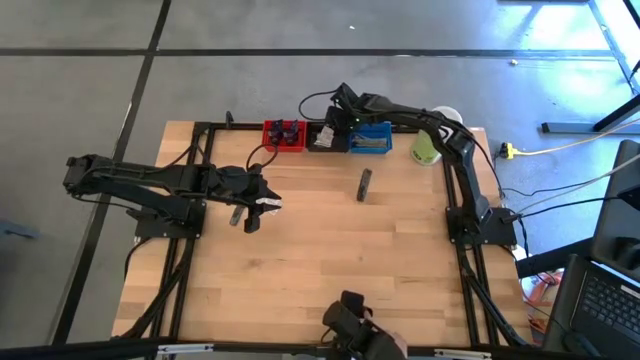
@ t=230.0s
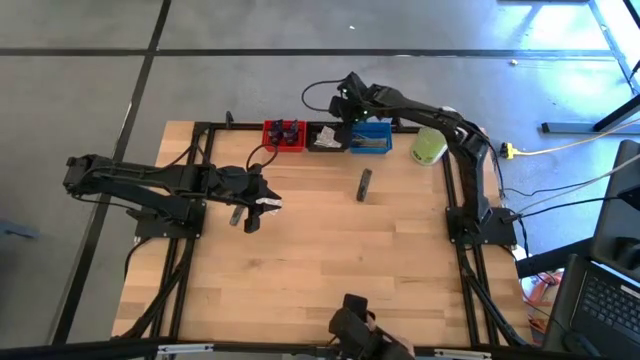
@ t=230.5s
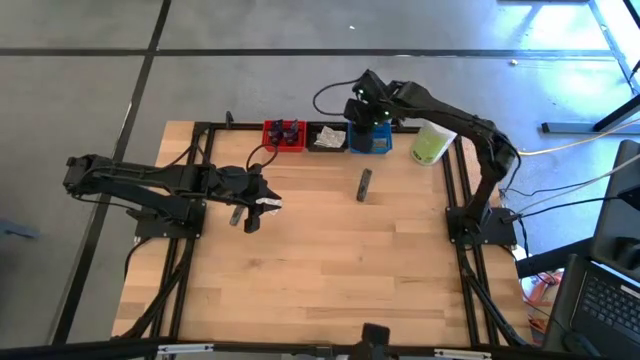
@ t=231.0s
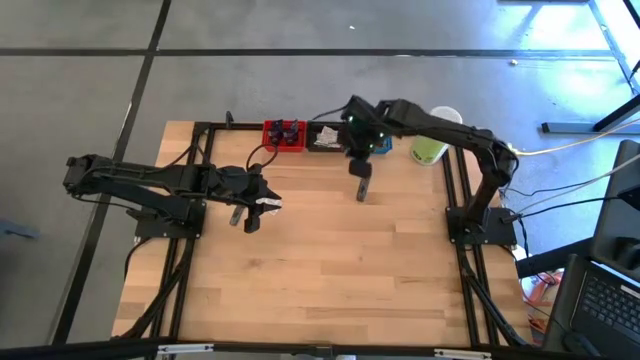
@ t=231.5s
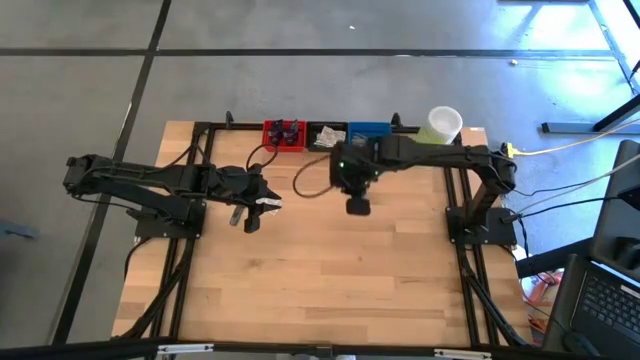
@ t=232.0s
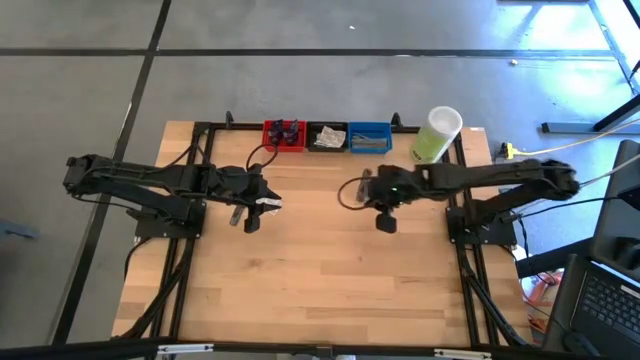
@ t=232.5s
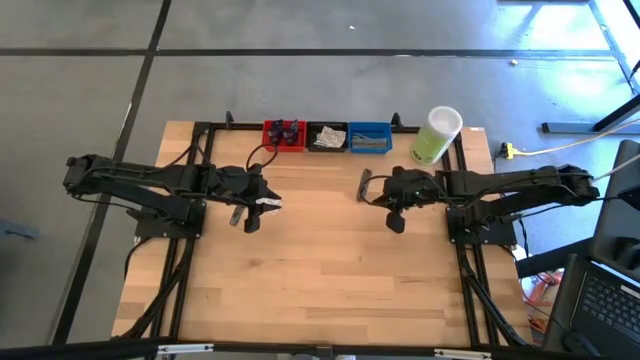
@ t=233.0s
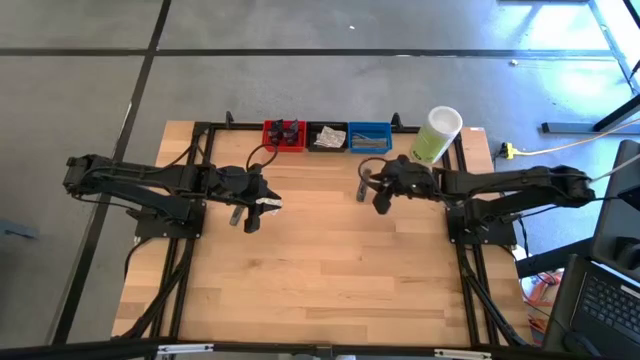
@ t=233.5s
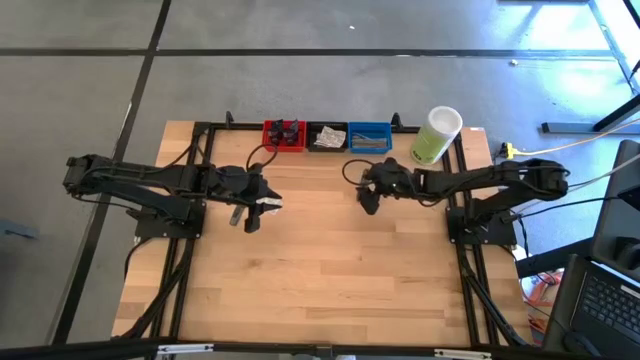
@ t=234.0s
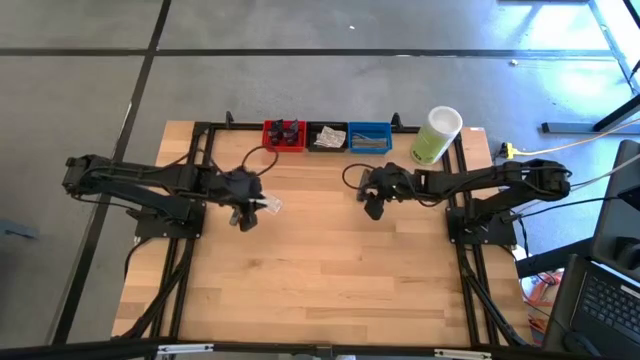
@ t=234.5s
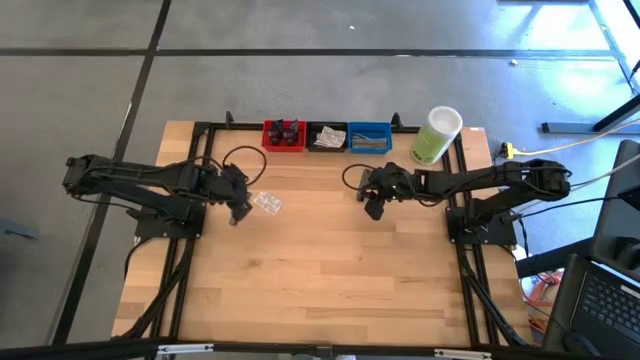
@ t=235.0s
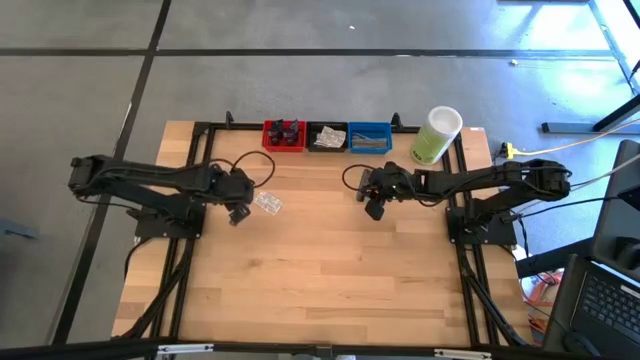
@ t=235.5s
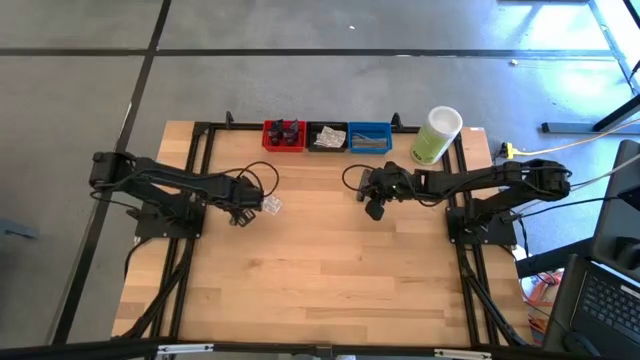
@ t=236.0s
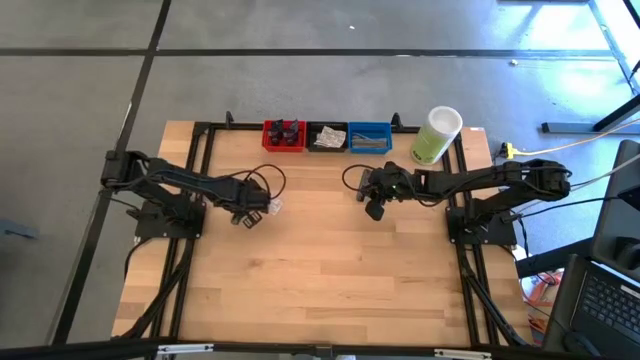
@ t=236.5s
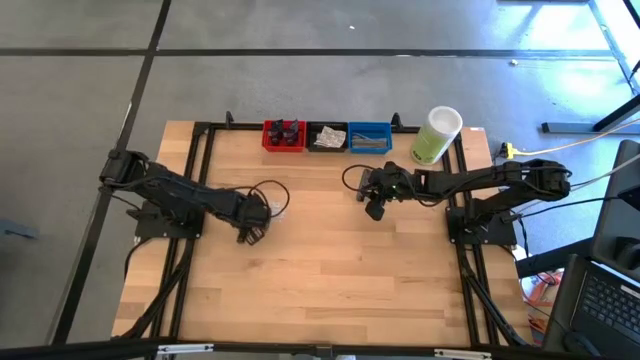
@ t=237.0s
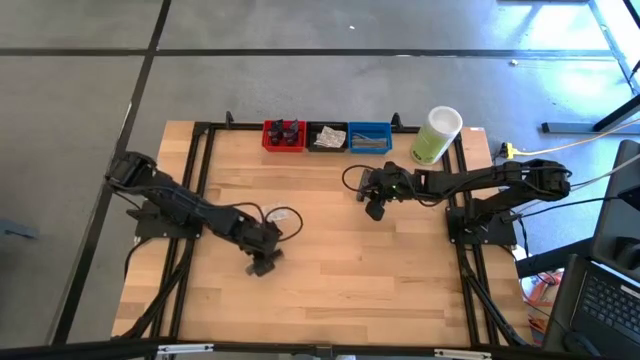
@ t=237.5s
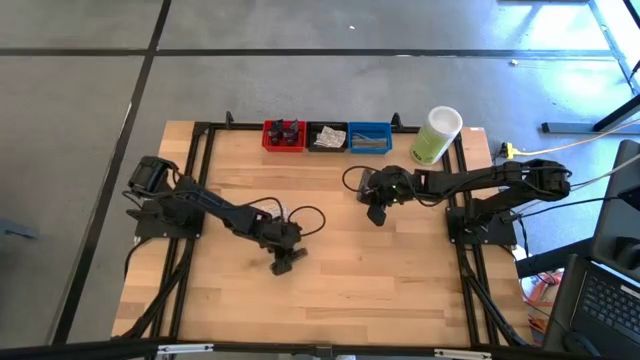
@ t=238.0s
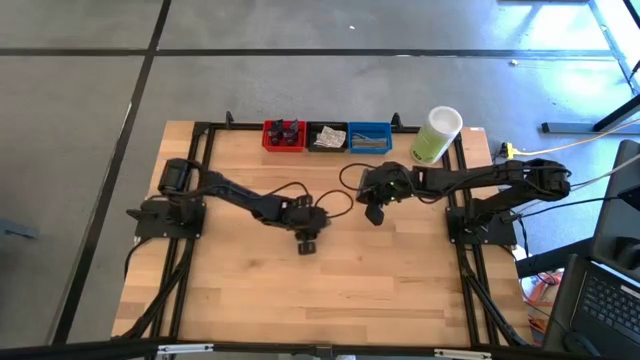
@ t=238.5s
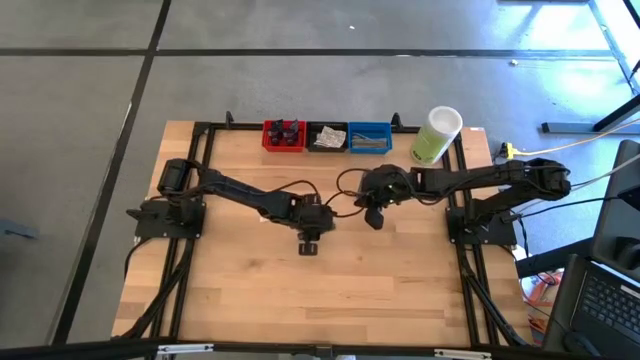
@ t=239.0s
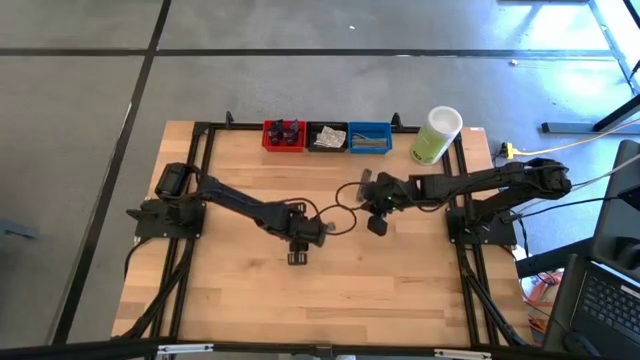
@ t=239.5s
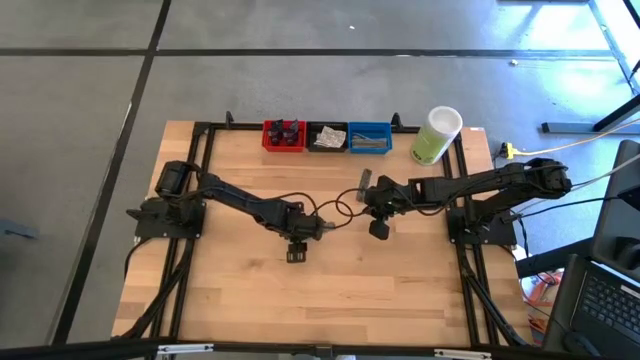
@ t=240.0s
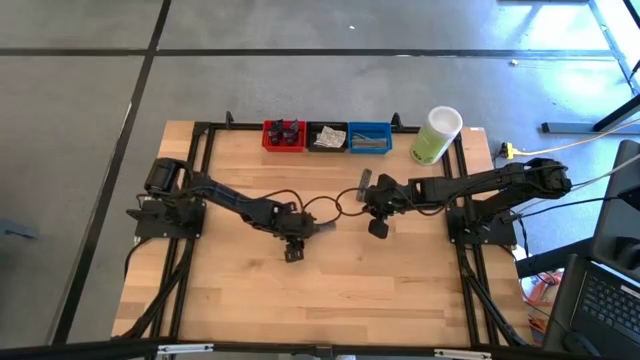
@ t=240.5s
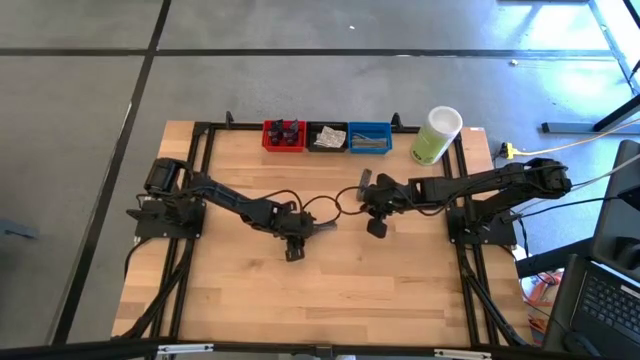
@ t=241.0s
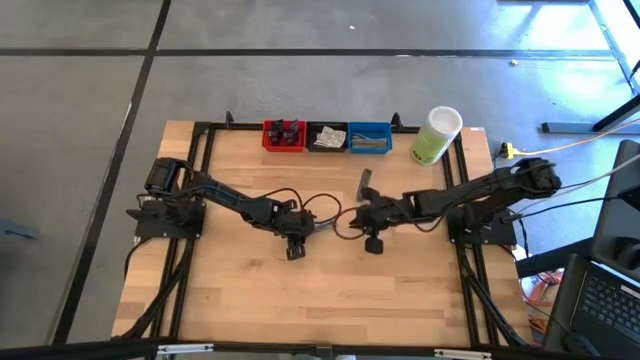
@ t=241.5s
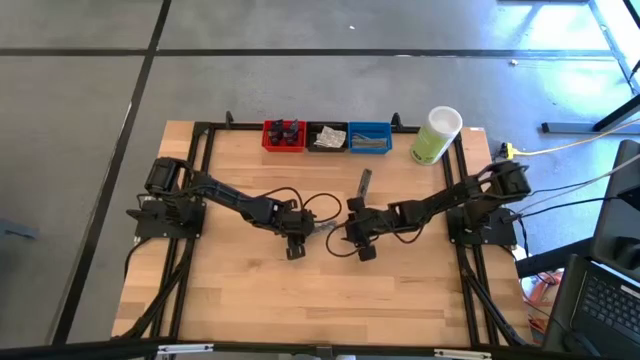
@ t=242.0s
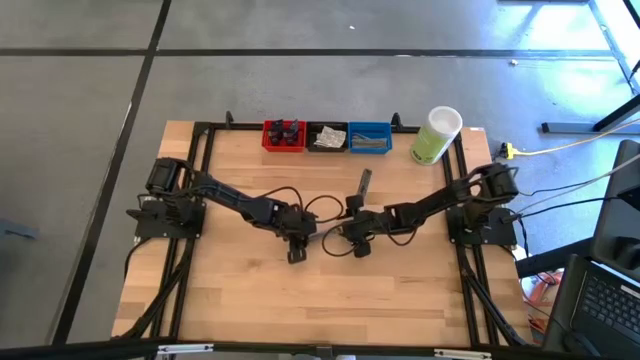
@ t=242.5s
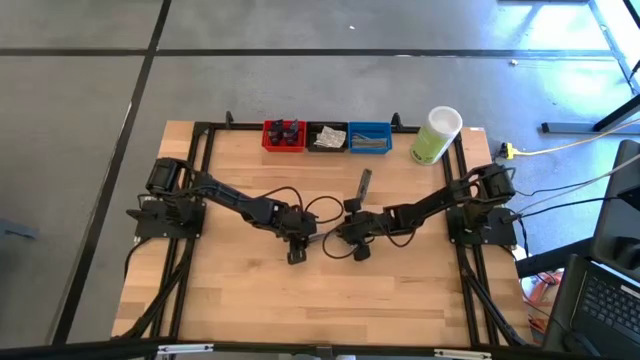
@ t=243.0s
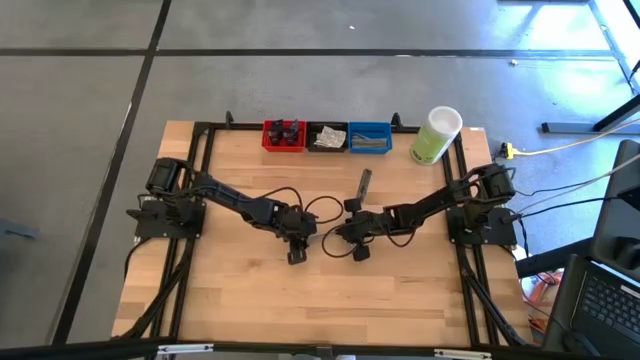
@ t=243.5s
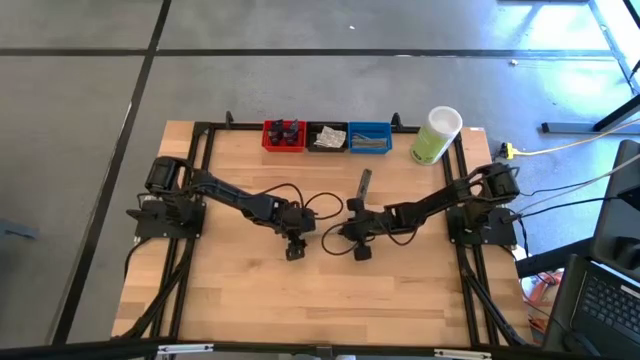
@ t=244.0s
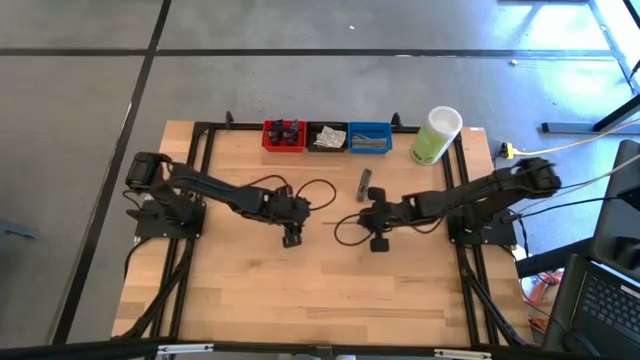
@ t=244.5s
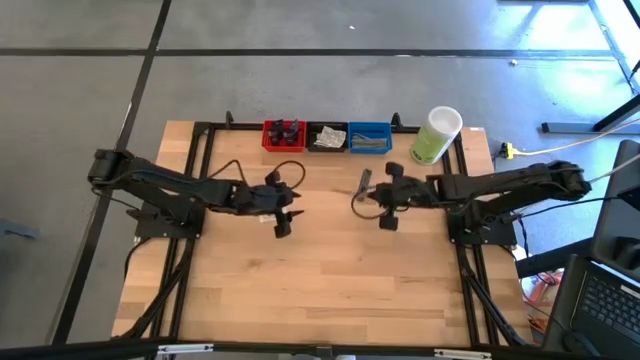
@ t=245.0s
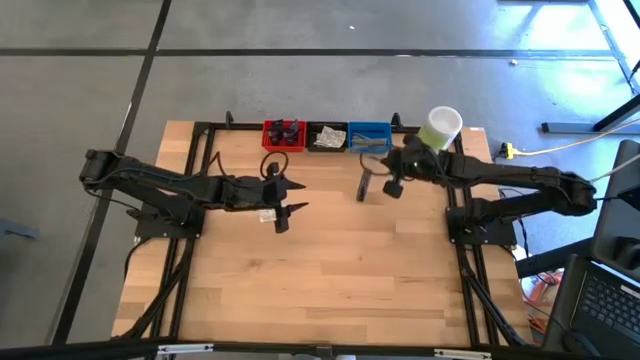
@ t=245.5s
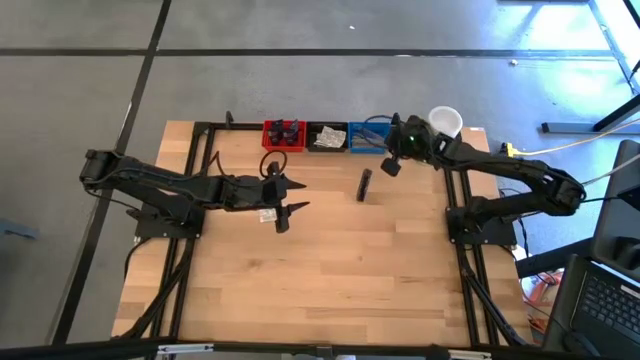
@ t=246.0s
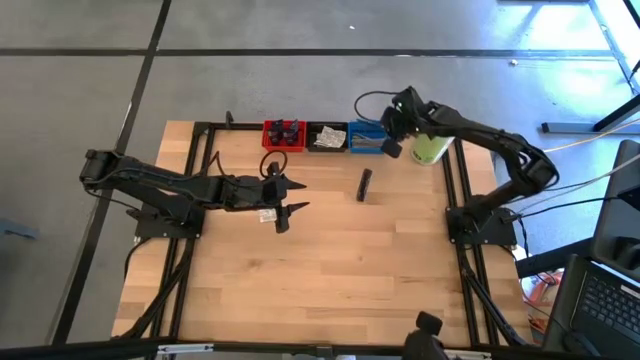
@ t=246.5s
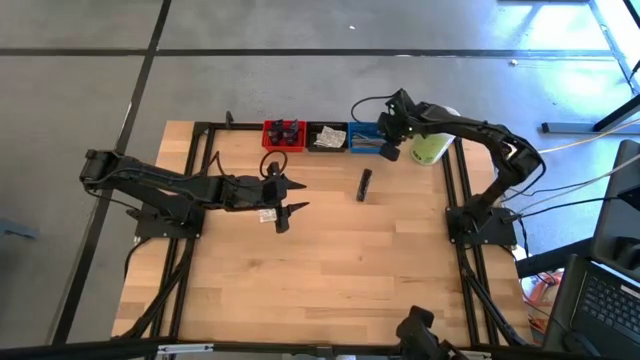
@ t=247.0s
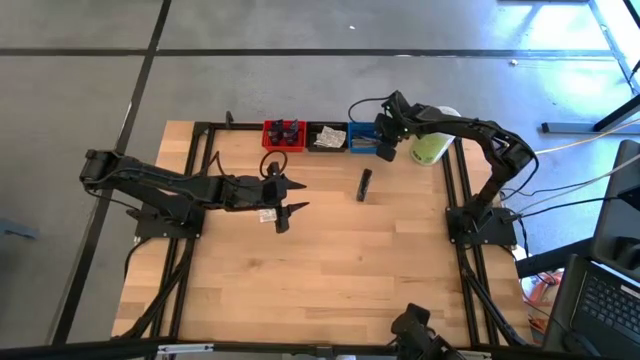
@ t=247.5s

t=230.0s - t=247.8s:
Task: Pick & Place Travel size toiletries
Put the black comb into the blue bin

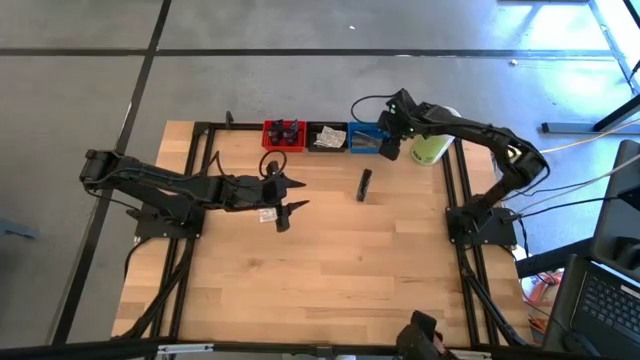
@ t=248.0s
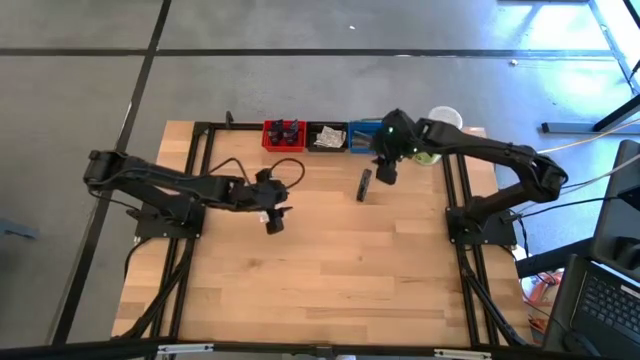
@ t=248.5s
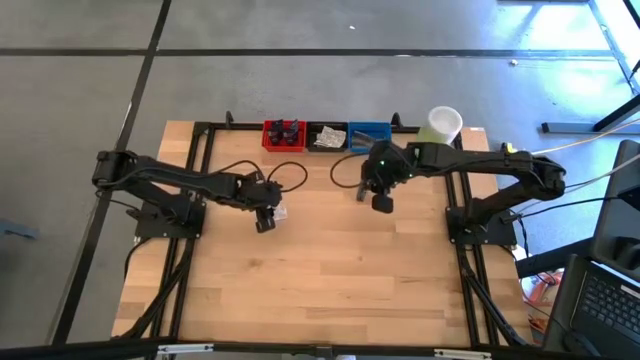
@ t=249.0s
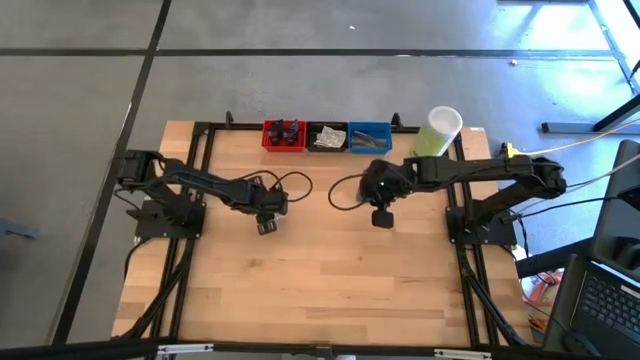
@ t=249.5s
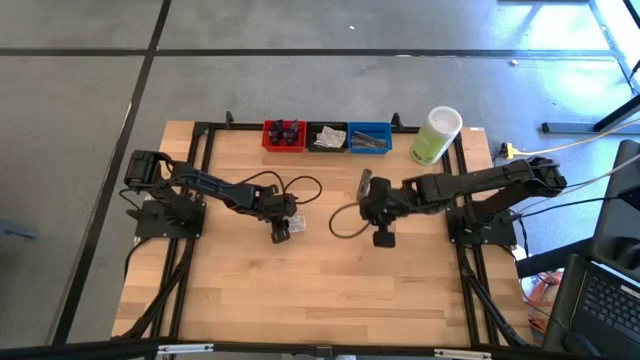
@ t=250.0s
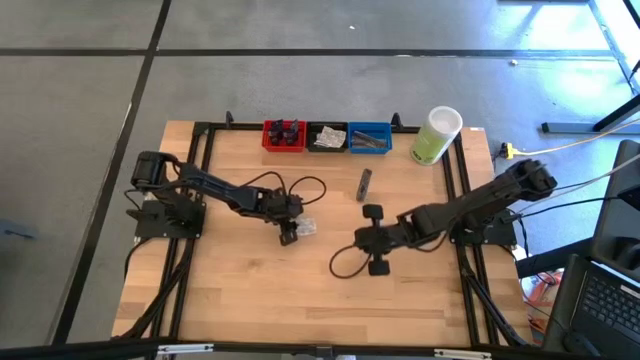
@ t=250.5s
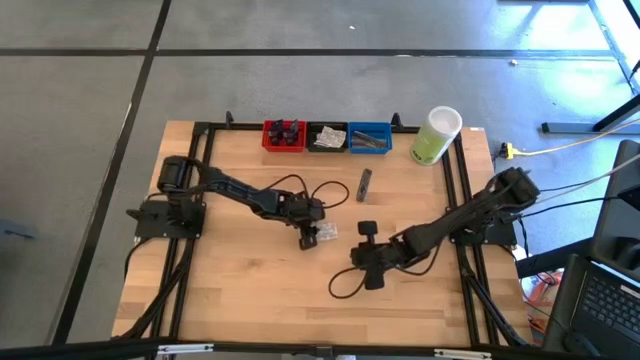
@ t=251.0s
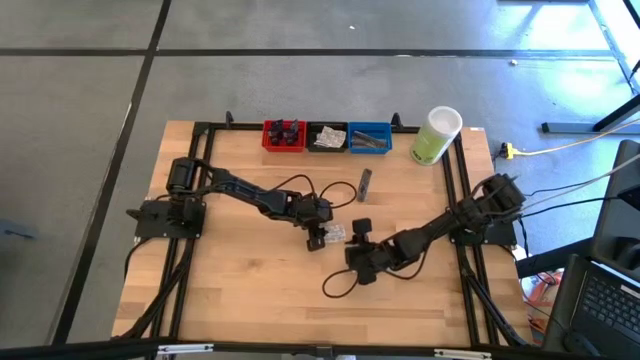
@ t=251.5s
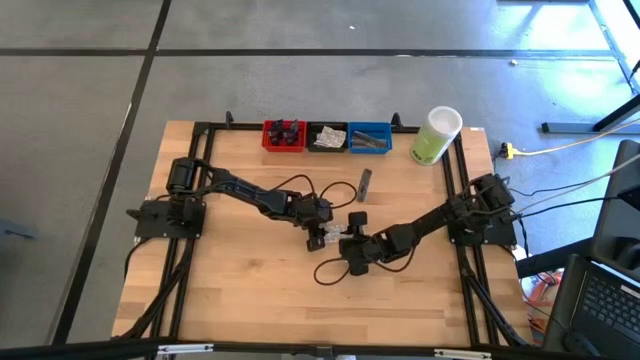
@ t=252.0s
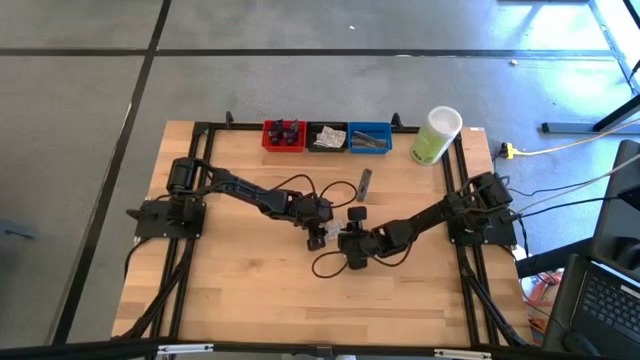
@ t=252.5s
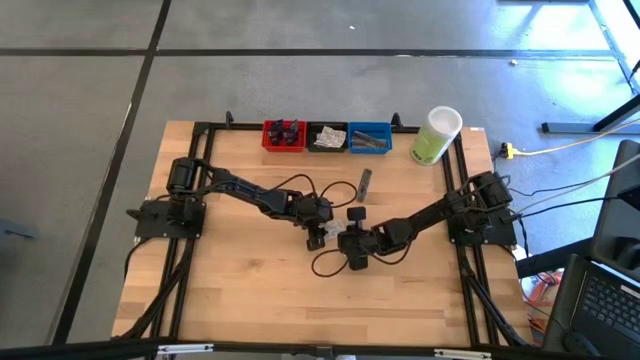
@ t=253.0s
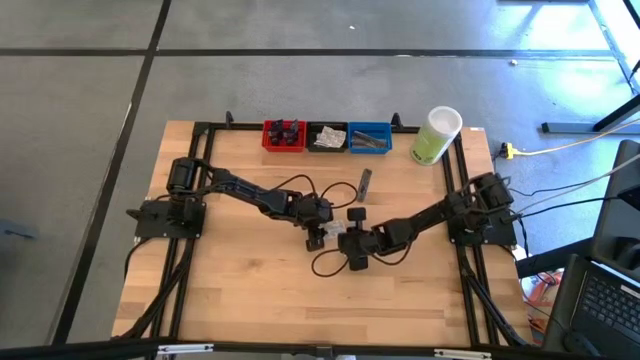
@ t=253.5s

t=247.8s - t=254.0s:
Put the white bandage pack into the black bin
